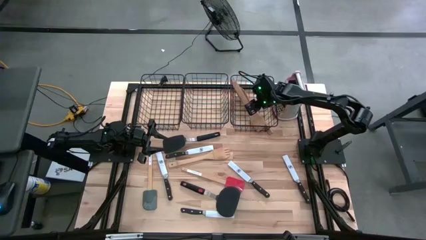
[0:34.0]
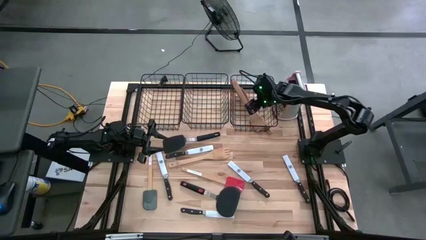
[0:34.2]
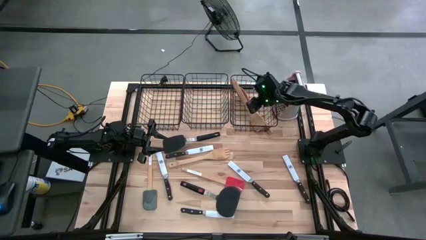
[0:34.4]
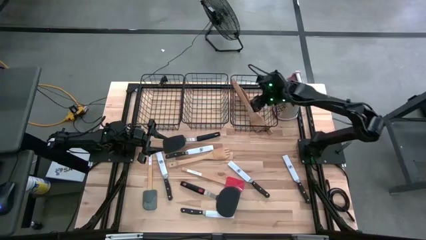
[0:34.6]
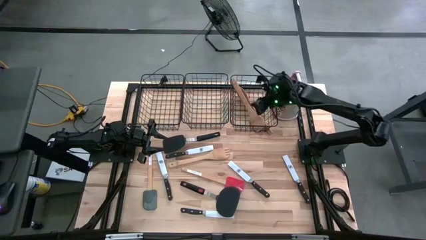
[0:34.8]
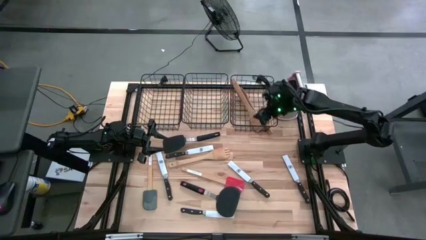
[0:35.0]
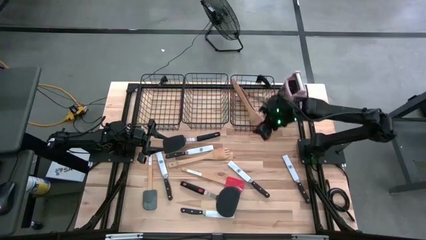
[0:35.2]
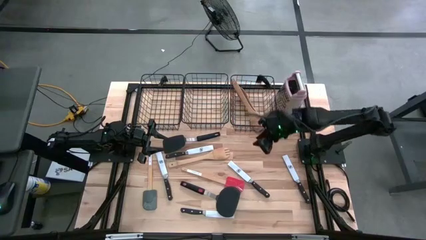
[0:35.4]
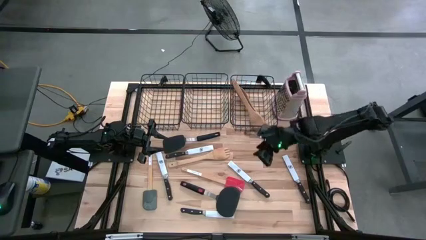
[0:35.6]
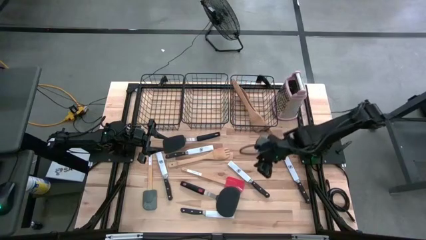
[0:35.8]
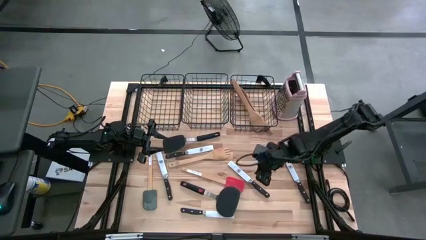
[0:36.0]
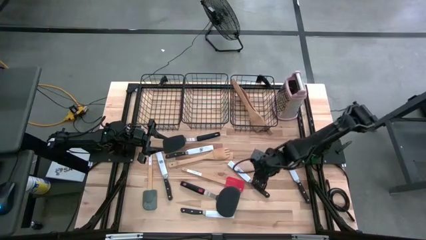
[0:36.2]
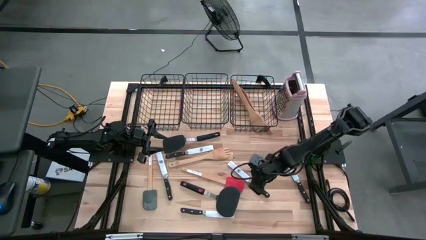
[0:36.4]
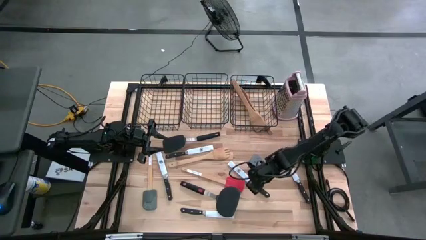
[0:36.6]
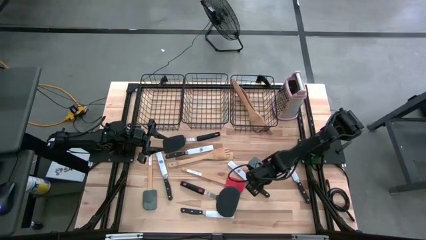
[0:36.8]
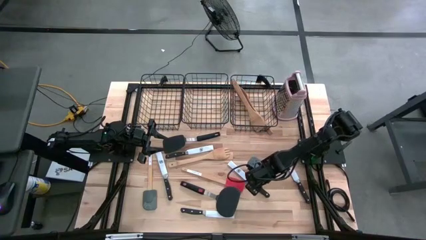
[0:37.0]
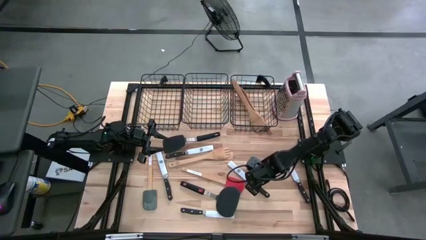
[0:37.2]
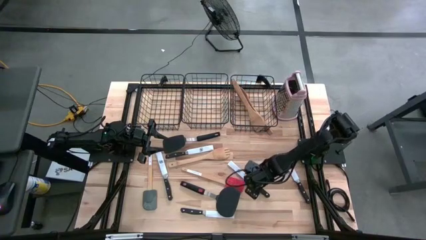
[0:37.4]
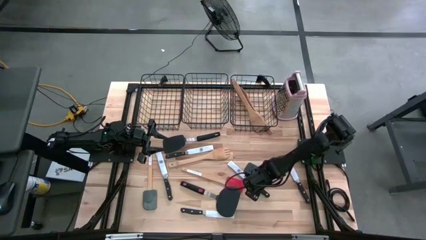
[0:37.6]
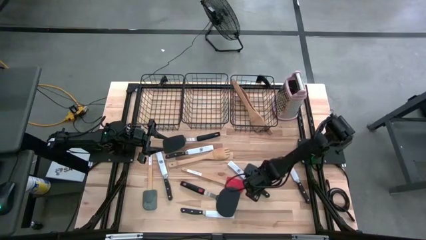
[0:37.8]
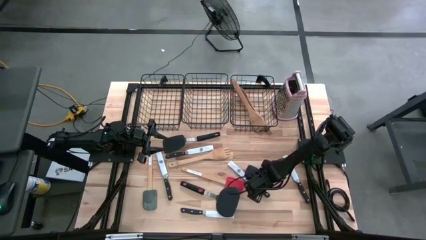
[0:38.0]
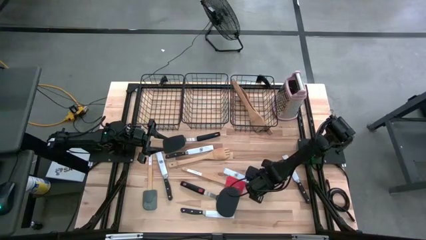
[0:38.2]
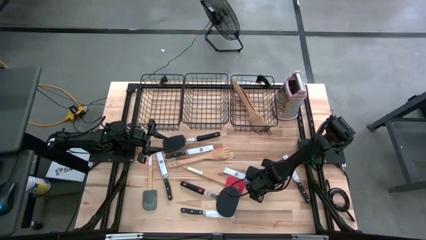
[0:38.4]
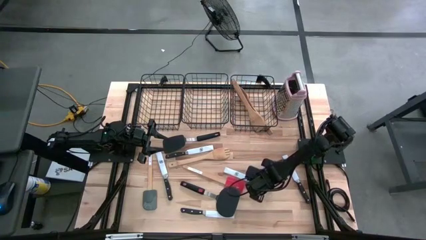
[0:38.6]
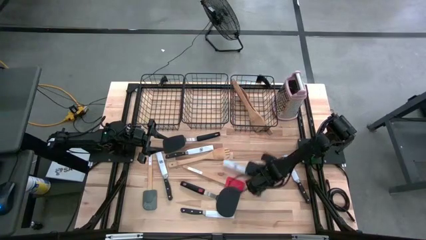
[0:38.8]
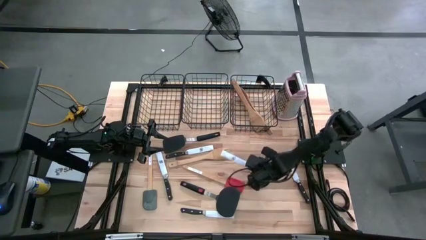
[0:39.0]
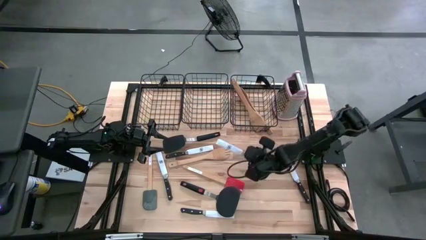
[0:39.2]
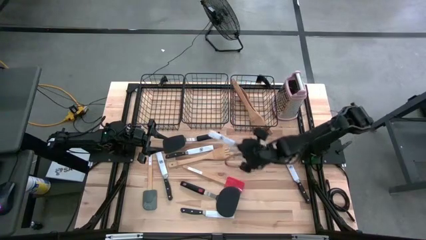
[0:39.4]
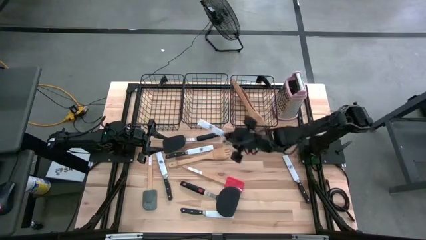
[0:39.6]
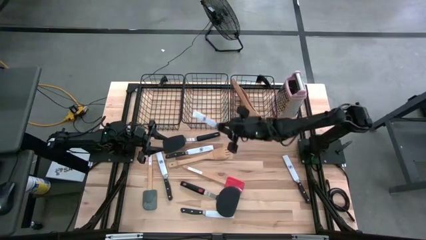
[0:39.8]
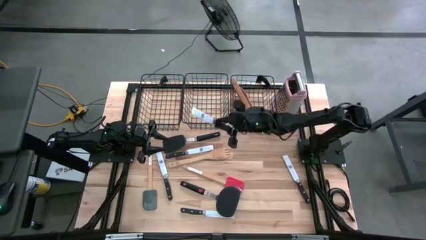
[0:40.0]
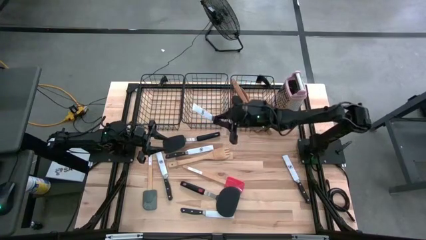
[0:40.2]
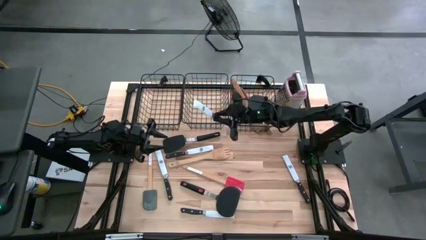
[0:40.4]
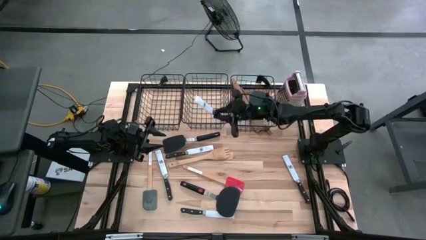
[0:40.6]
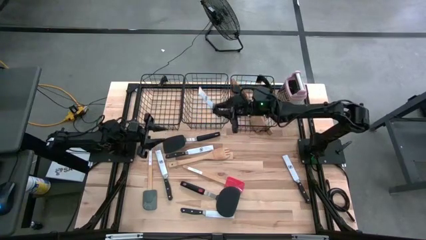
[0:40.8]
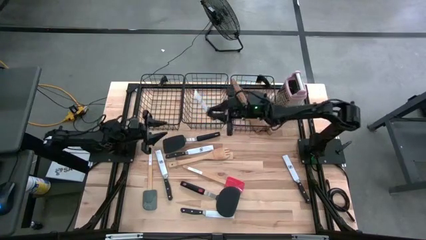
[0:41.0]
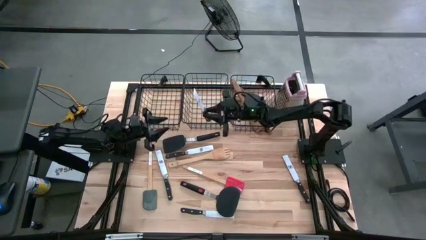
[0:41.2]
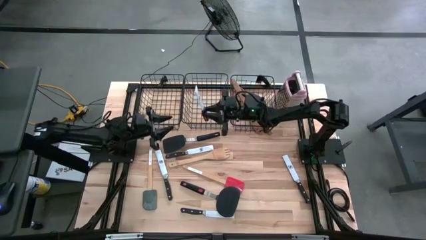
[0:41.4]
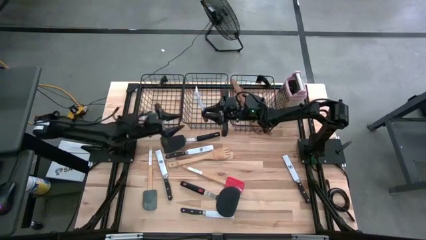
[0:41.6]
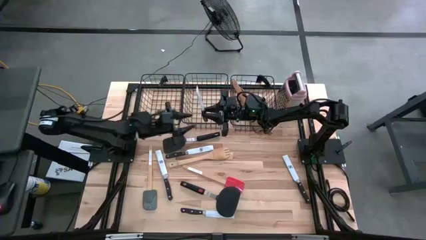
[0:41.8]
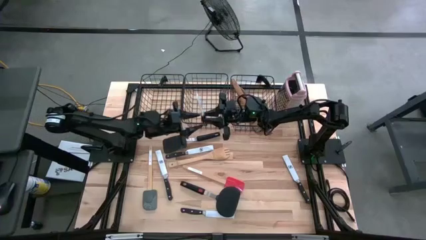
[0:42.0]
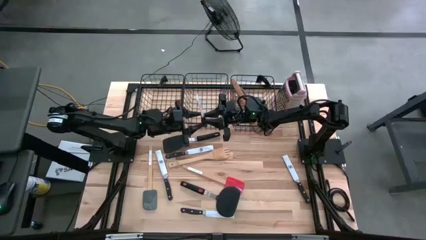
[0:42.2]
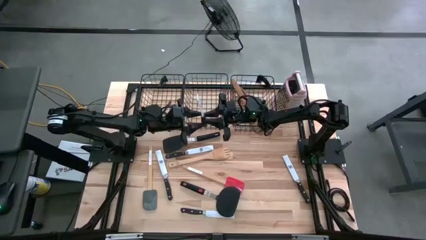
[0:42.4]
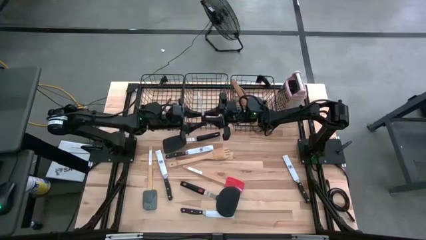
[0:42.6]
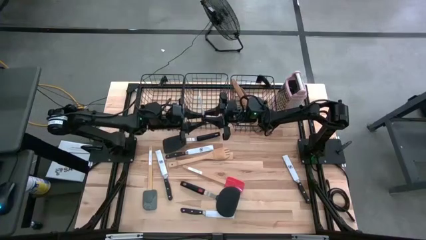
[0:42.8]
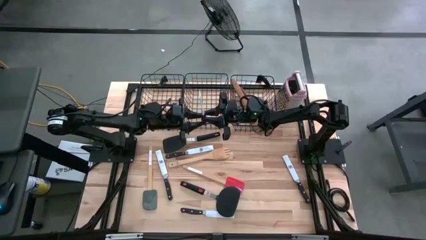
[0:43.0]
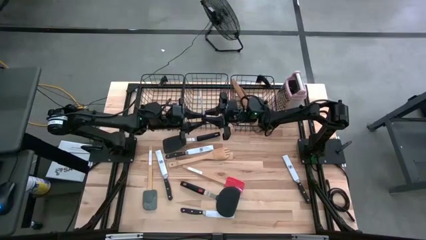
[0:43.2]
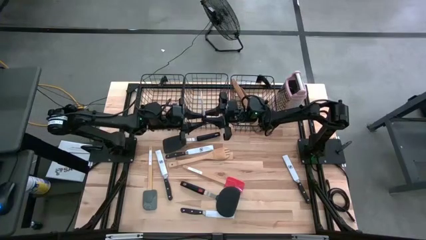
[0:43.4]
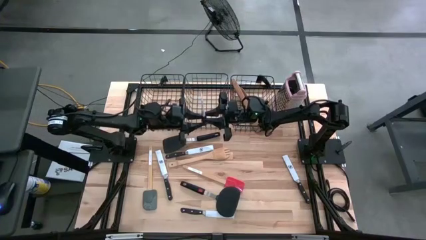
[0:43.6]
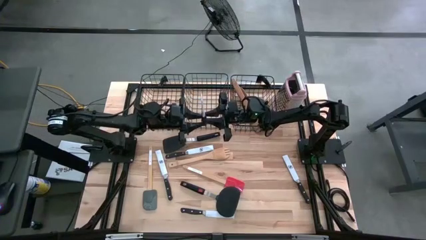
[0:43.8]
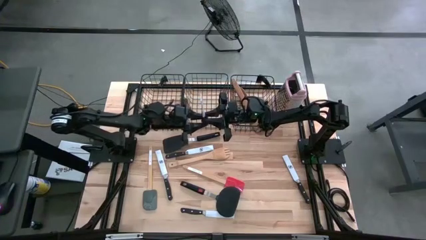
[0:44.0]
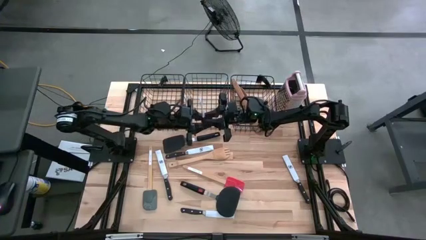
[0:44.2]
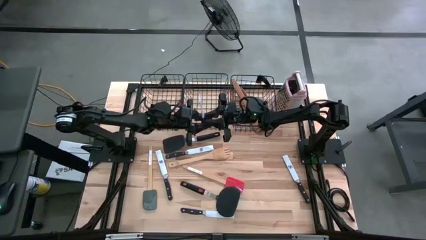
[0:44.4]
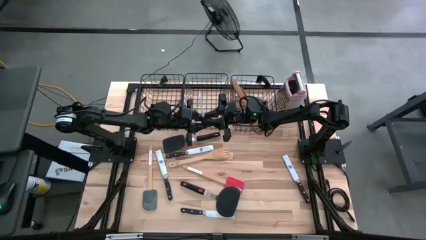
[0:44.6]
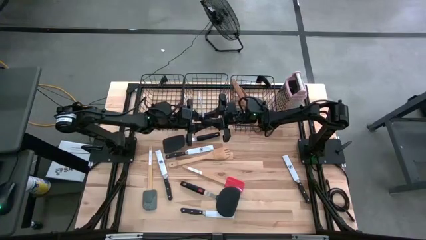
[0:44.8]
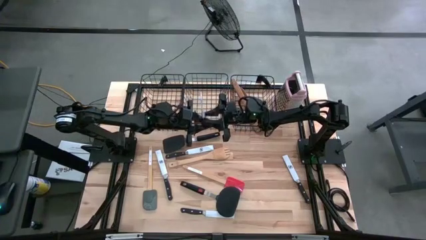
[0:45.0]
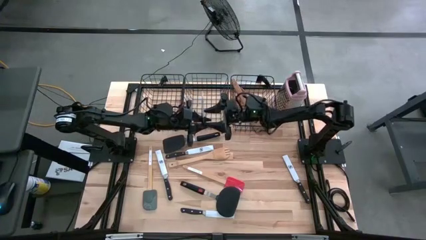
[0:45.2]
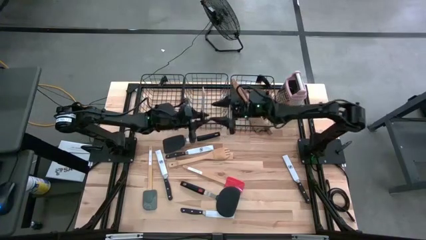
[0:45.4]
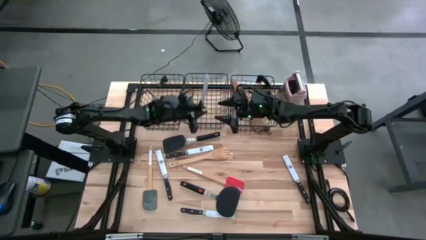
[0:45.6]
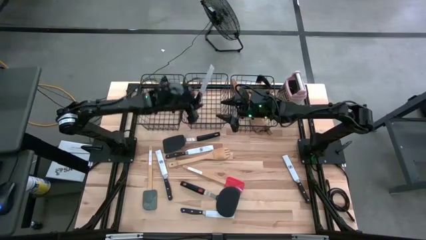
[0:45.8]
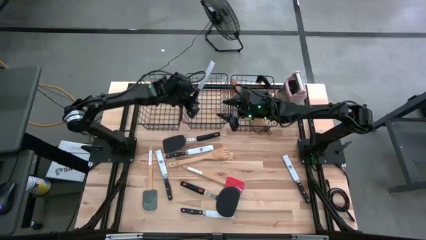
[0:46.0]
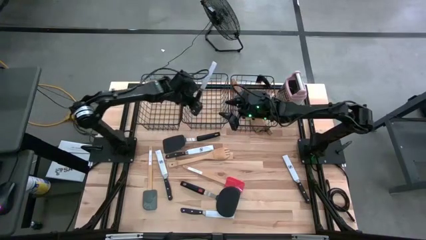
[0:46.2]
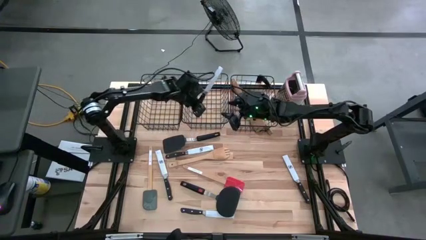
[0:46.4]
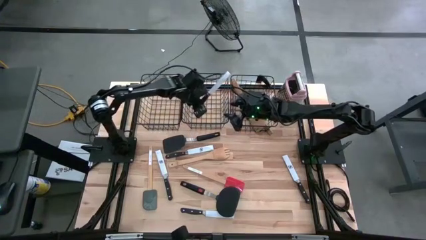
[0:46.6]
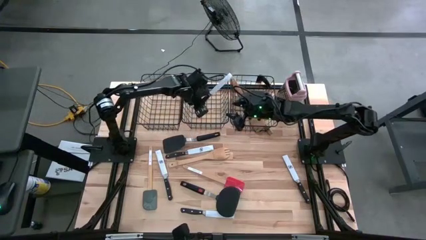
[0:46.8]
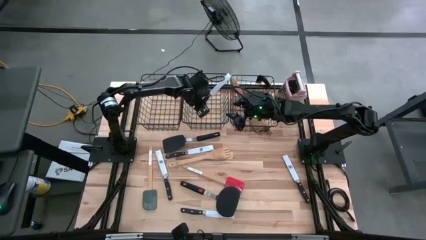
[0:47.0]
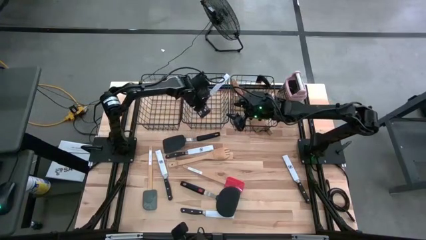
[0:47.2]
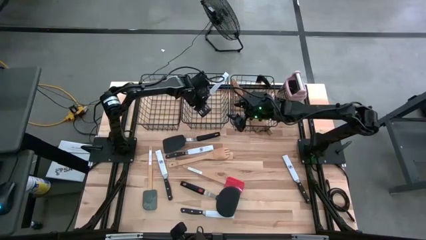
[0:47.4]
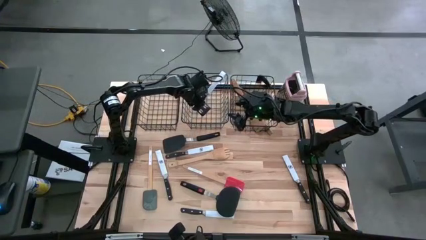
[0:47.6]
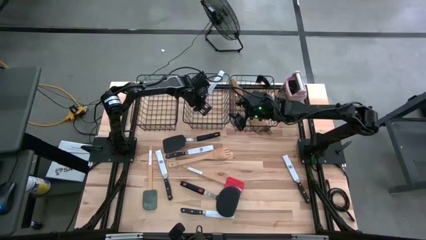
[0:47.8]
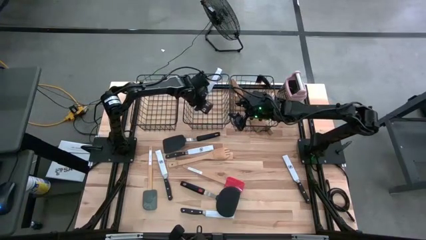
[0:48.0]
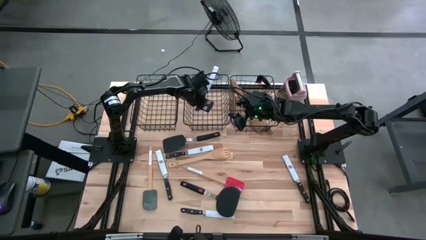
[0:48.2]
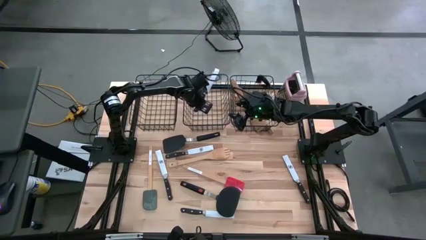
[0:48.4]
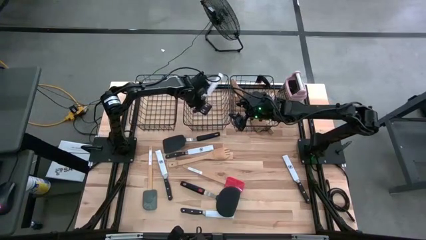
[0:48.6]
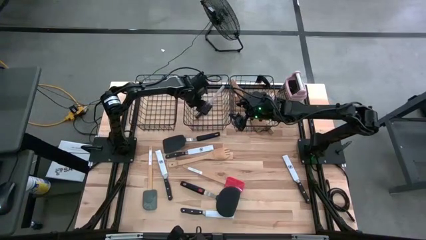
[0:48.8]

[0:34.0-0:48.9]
Task: Pick & Place Kitchen Items
Put the black knife into the middle black wire basket
